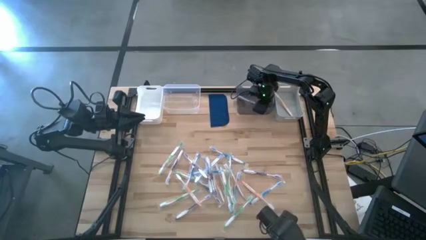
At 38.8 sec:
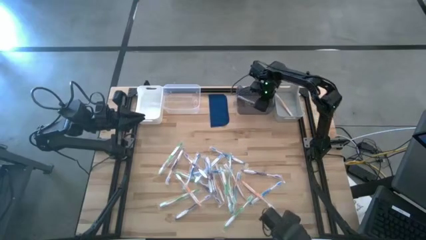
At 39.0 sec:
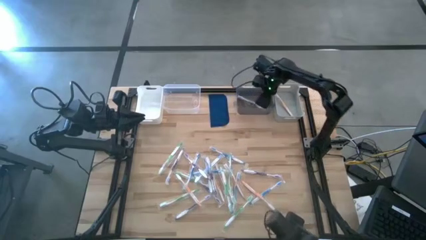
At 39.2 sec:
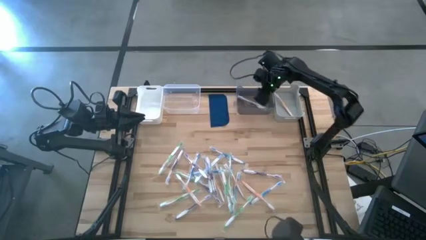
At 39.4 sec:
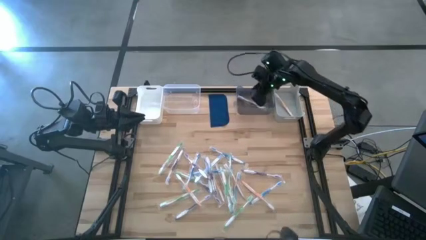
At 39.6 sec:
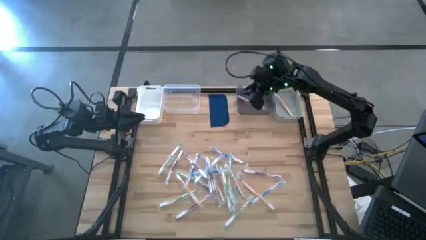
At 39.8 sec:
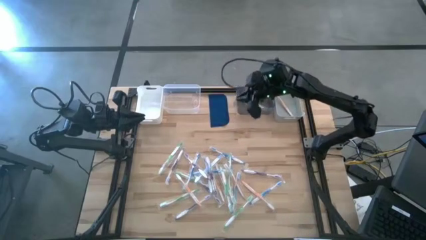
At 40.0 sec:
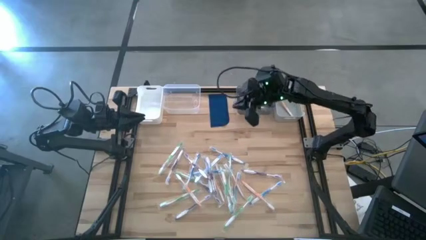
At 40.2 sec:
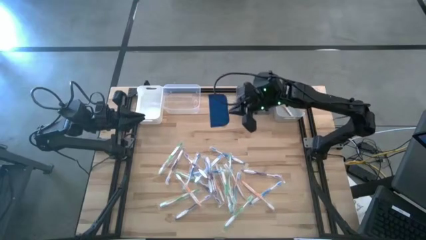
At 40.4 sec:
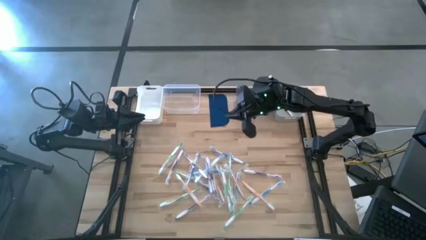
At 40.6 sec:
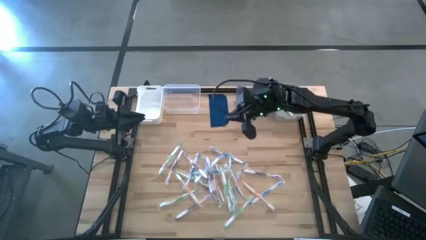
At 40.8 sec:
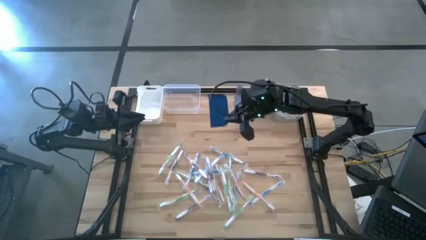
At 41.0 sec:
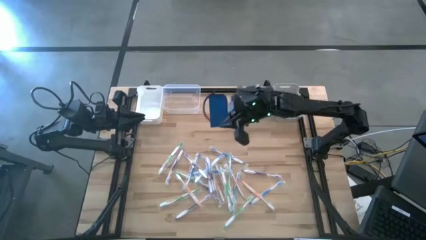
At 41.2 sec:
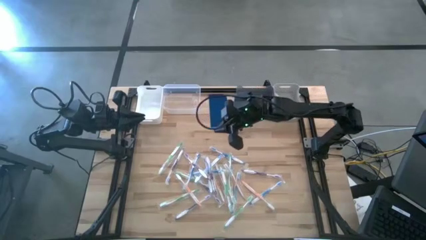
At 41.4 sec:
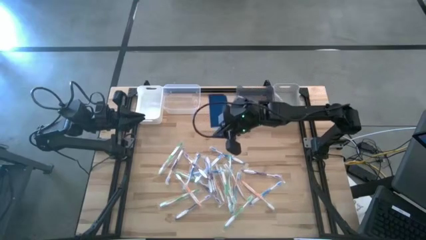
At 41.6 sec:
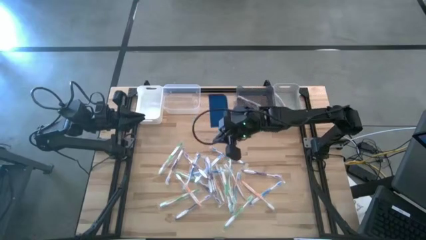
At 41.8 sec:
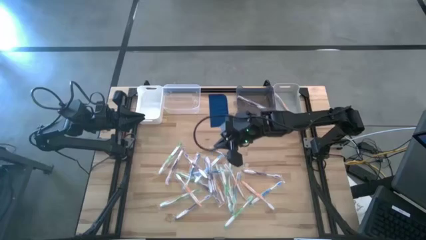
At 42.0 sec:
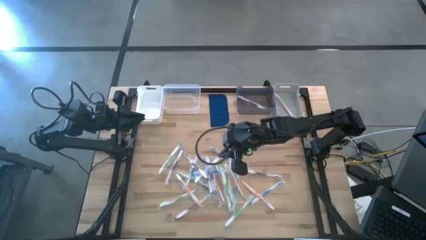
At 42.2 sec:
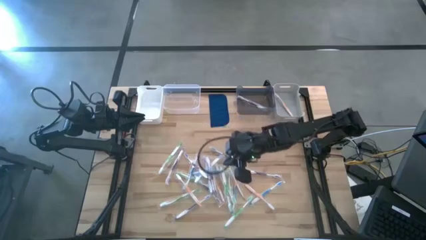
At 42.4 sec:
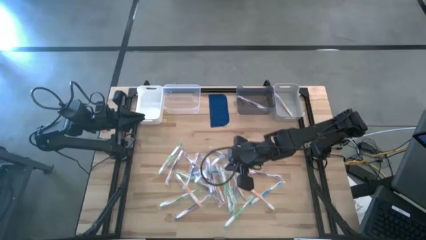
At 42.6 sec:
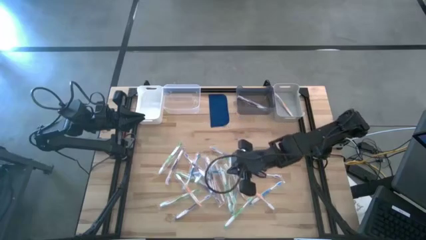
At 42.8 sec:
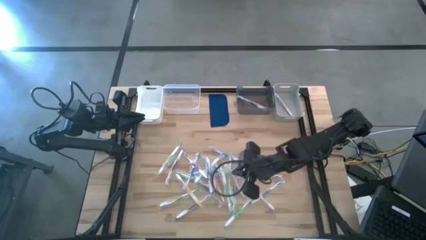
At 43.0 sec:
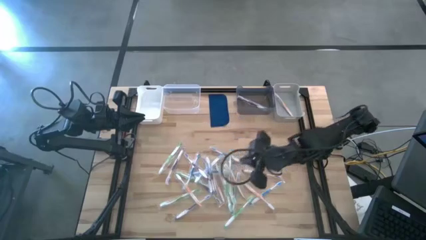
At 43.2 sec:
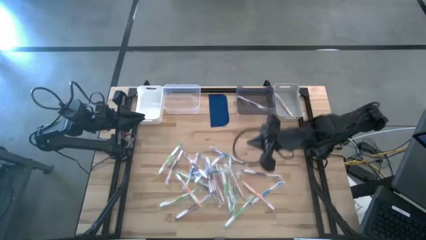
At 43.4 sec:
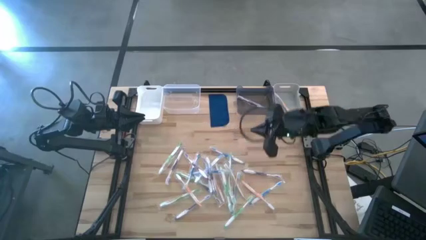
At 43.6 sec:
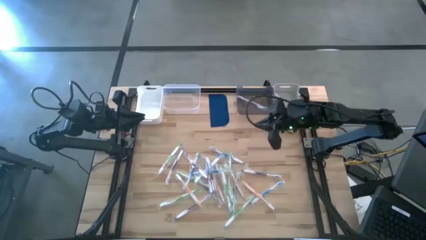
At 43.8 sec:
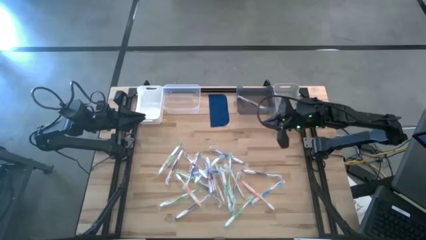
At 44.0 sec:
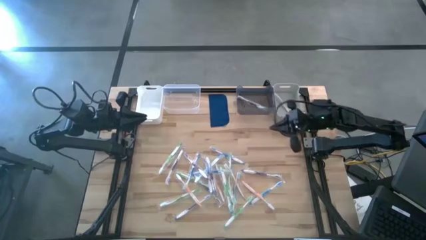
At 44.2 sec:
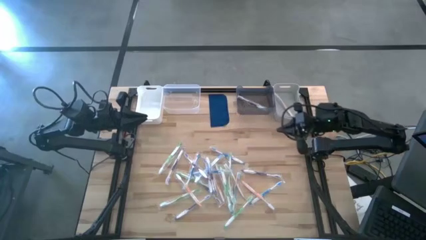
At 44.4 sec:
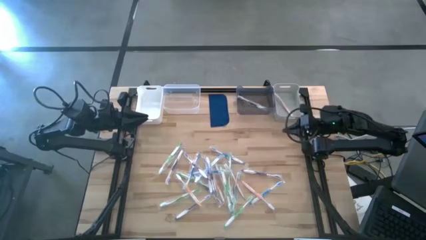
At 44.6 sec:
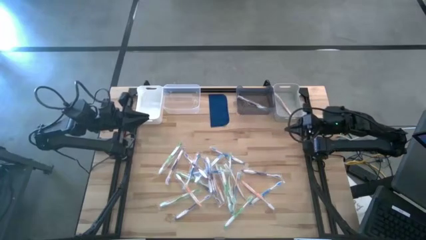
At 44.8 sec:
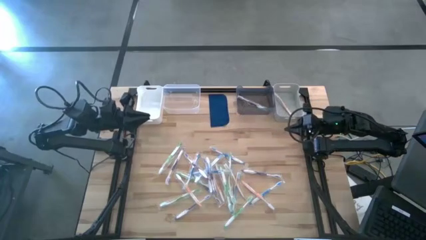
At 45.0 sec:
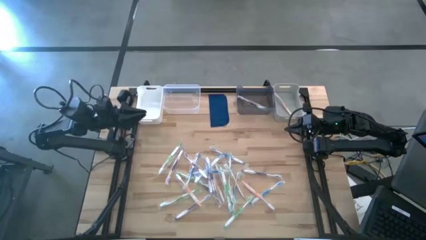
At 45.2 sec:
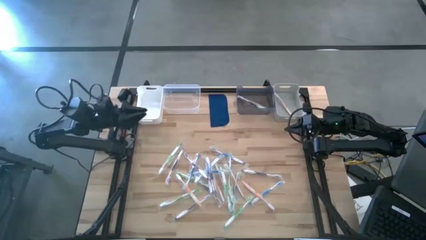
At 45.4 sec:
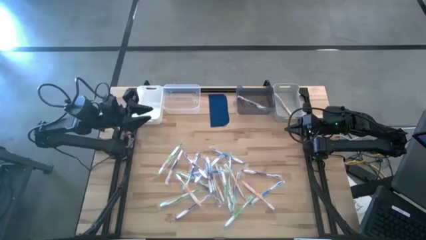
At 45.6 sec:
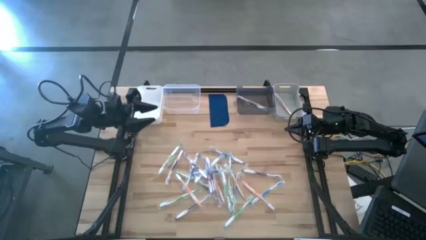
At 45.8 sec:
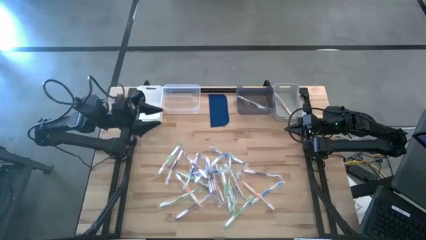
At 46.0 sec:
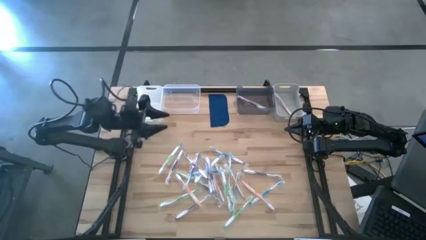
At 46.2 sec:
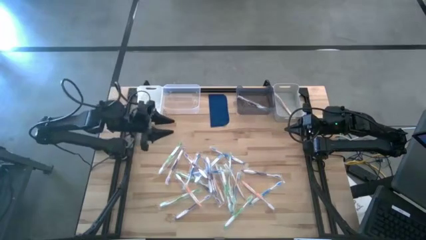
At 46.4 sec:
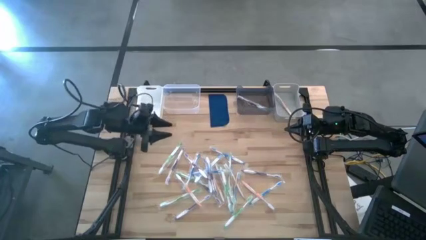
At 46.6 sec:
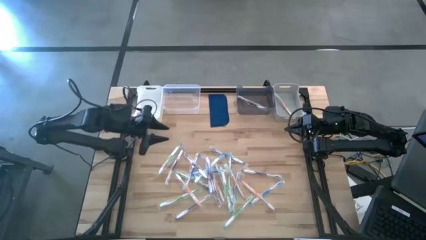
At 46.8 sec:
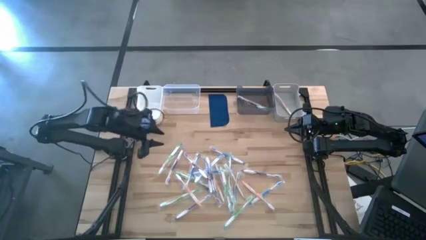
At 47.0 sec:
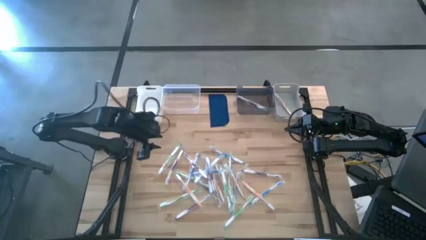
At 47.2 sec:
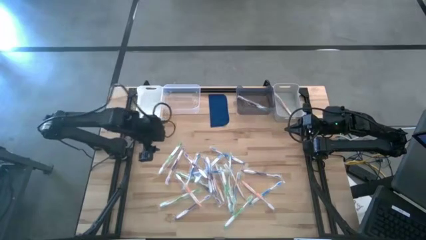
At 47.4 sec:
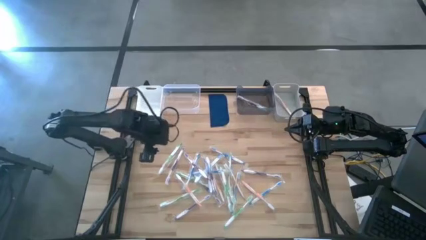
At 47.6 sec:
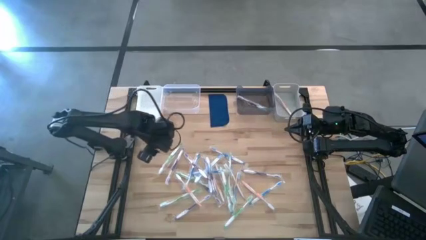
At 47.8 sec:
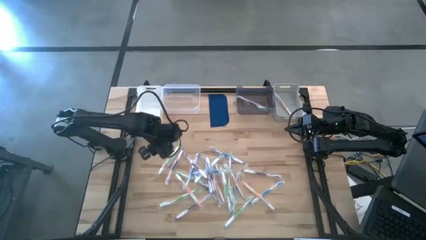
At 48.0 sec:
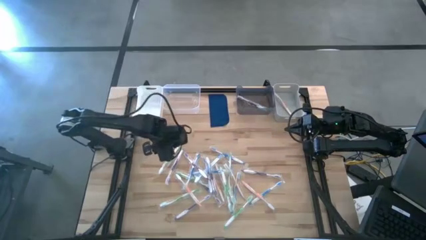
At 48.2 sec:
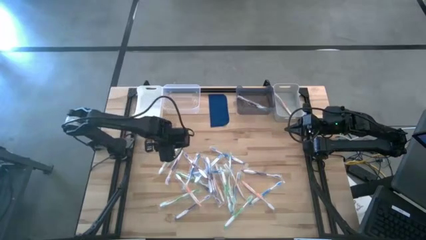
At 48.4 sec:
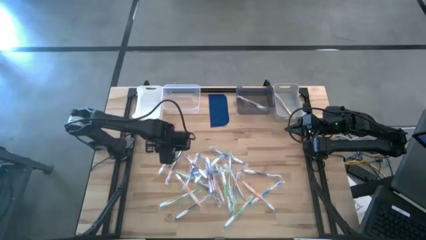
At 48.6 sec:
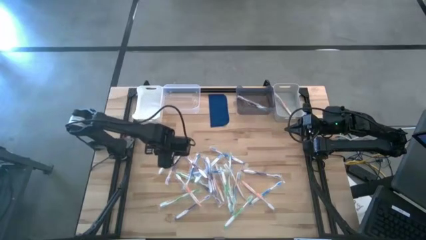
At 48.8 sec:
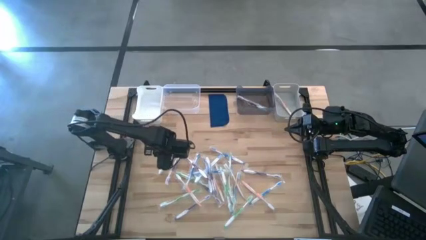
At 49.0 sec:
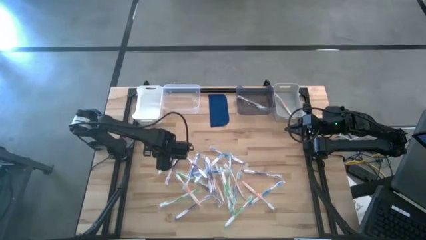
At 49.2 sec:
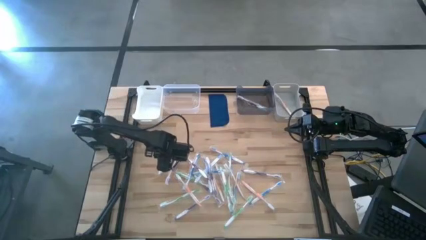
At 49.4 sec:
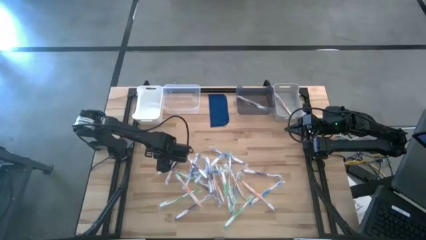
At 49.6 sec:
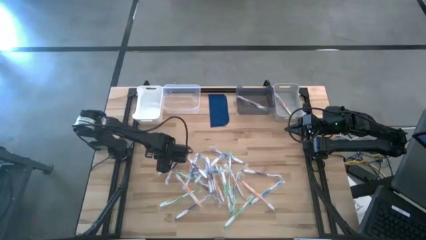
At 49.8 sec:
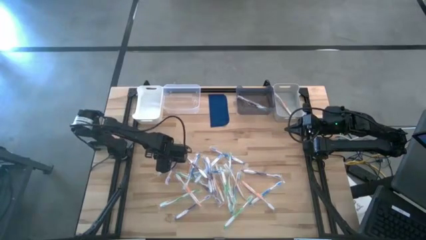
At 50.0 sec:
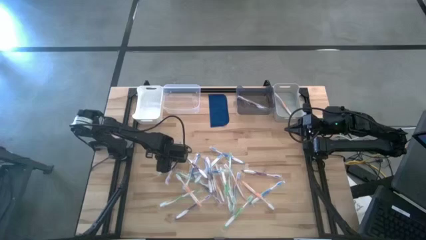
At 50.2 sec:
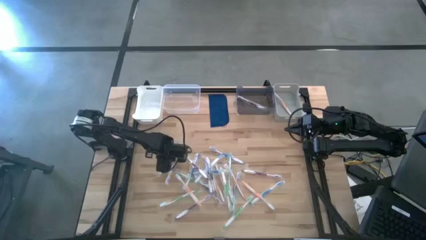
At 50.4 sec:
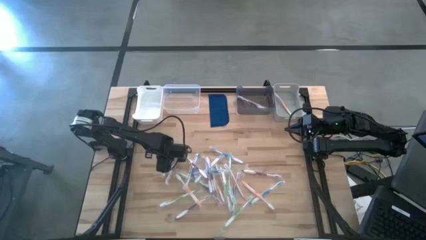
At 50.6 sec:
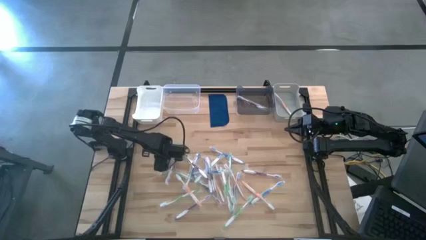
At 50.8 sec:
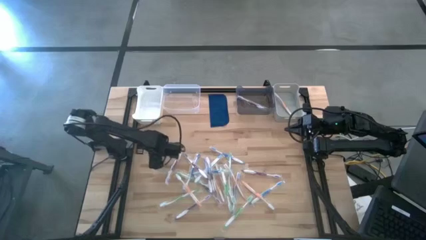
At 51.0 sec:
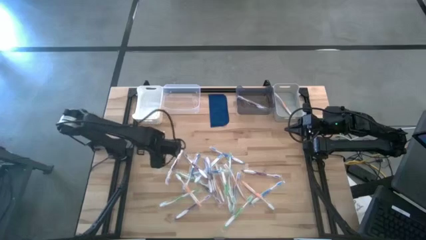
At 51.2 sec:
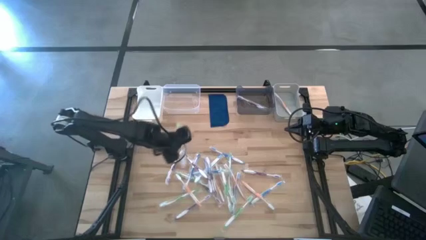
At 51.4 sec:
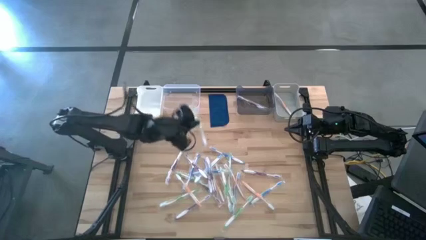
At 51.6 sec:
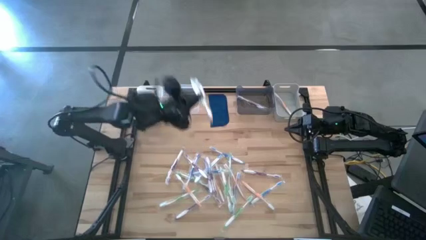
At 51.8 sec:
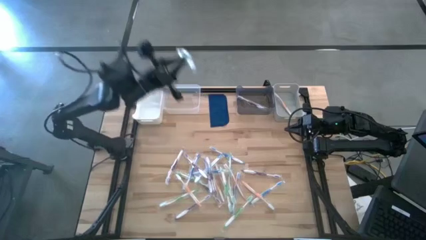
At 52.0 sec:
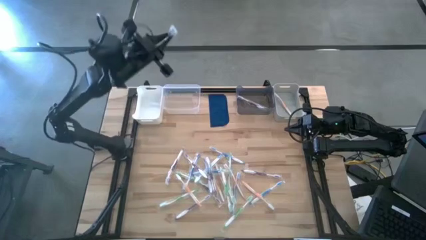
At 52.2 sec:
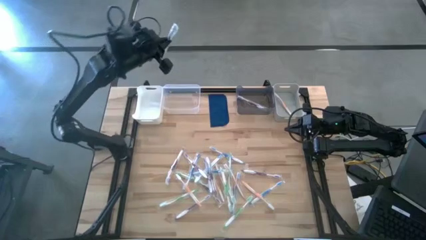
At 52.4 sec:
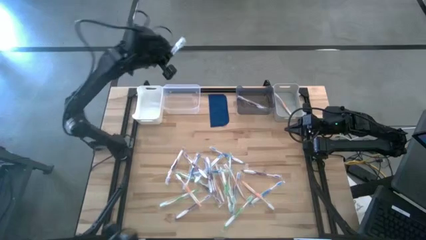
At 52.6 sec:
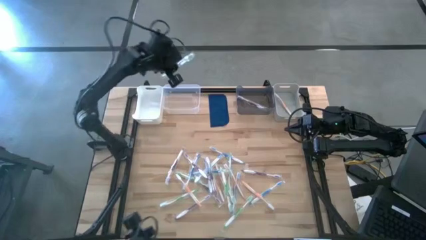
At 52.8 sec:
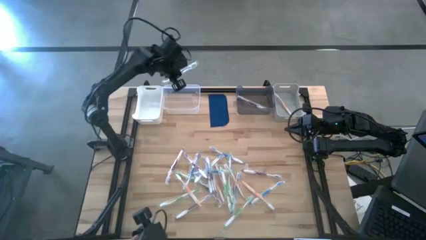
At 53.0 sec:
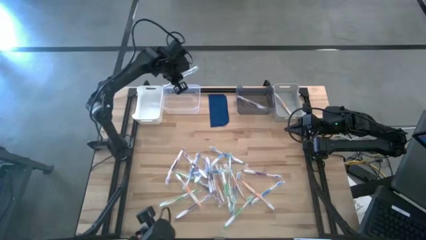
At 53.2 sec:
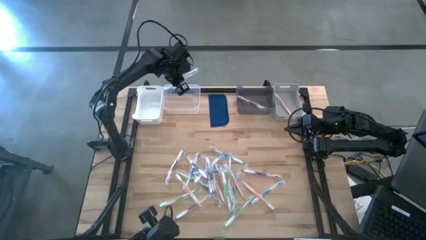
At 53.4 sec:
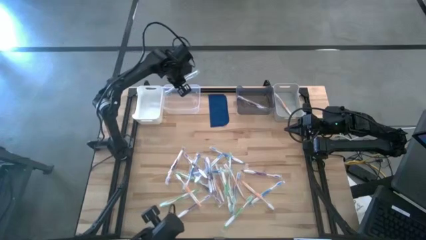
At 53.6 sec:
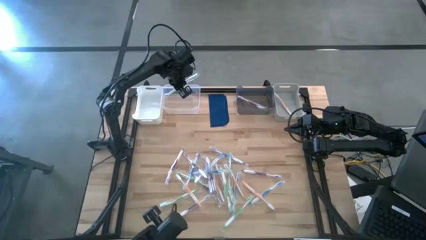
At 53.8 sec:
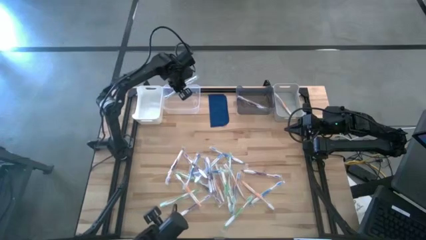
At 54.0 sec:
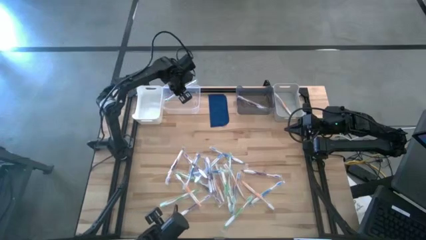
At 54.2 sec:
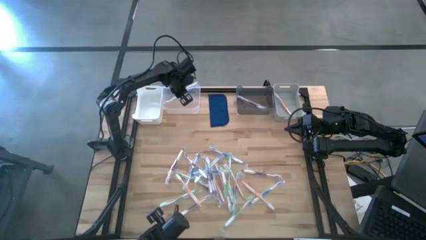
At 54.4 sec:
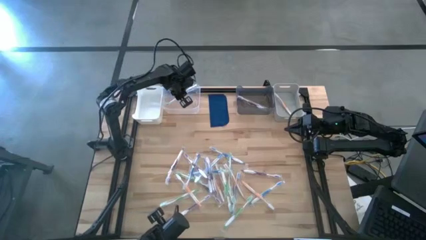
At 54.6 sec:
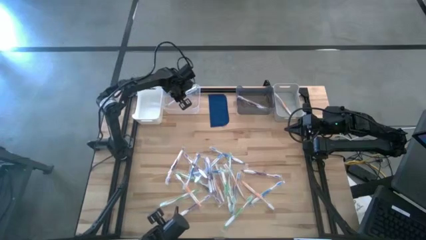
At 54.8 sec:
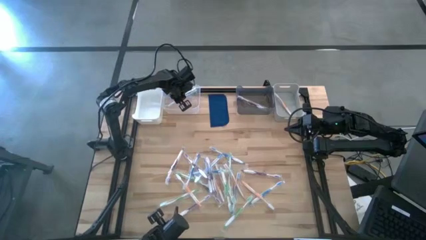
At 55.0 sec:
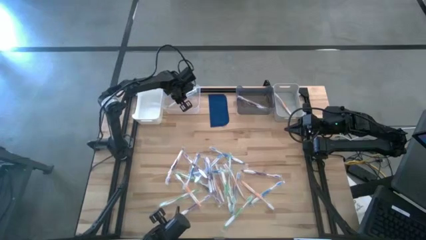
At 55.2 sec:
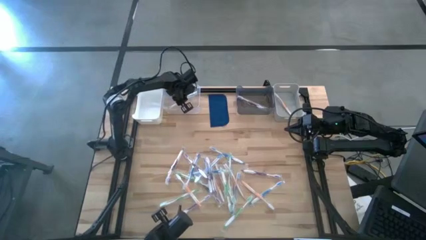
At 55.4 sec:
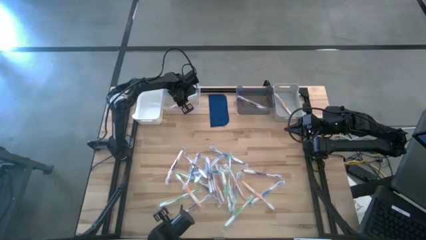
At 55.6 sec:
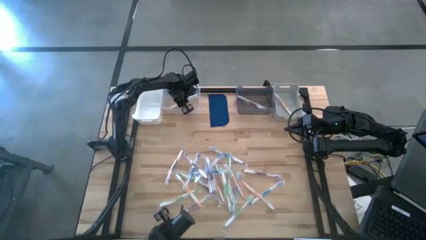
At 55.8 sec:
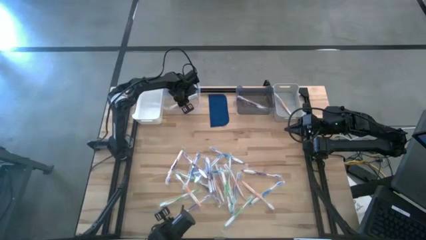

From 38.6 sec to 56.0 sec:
Task: Pick & Place Toothbrushes
Put the green toothbrush into the transparent bin
